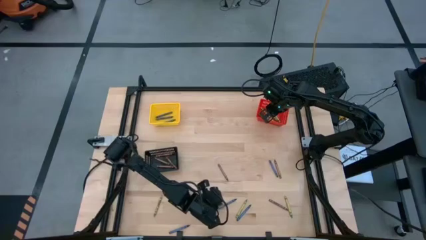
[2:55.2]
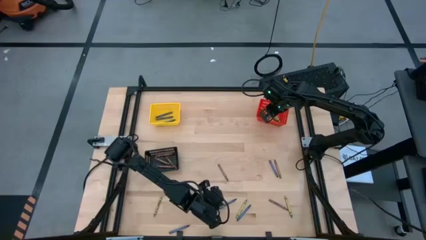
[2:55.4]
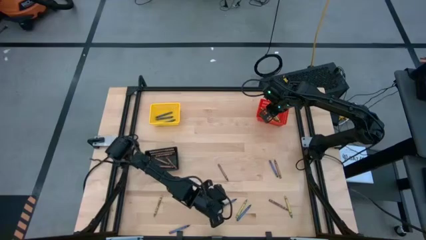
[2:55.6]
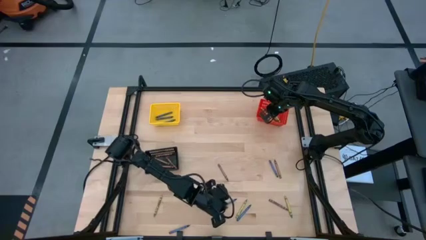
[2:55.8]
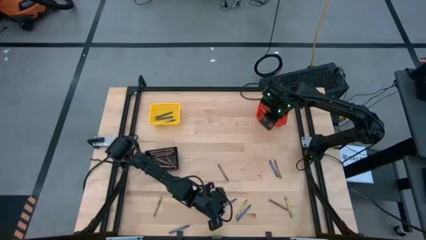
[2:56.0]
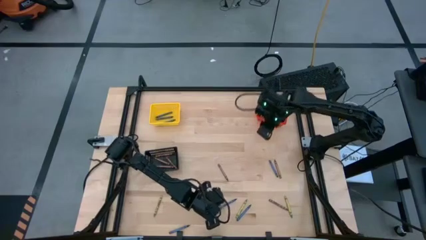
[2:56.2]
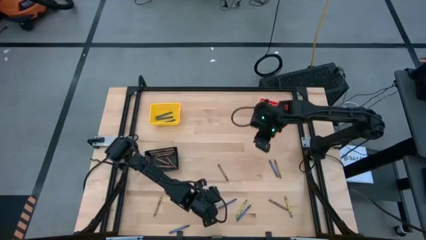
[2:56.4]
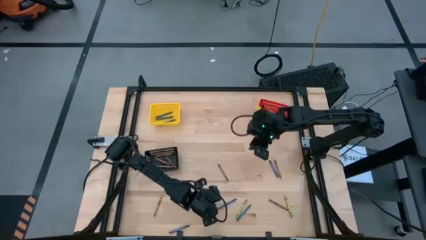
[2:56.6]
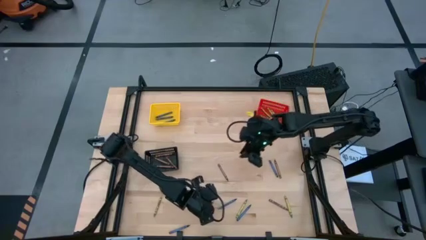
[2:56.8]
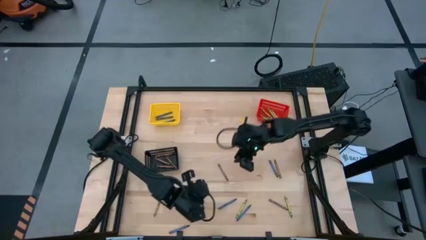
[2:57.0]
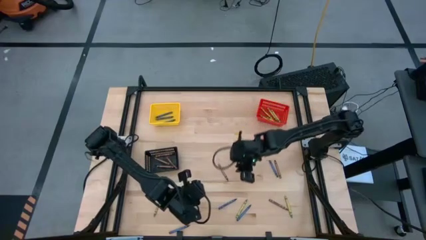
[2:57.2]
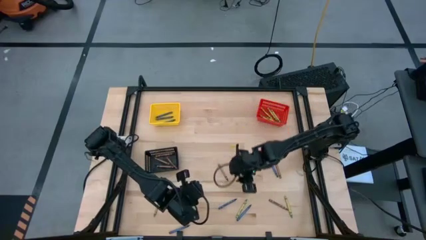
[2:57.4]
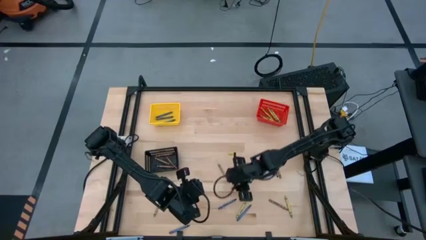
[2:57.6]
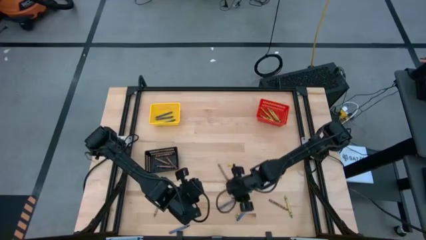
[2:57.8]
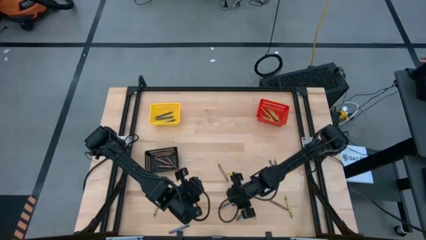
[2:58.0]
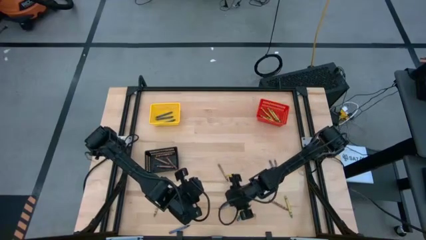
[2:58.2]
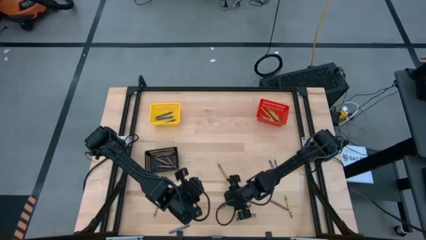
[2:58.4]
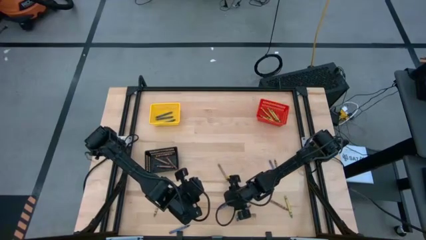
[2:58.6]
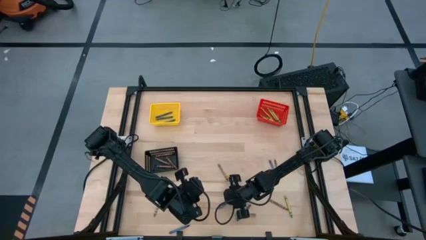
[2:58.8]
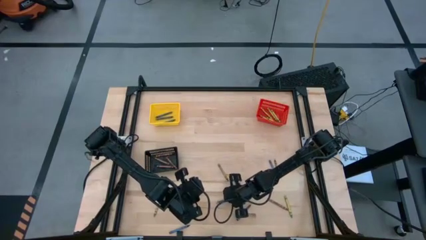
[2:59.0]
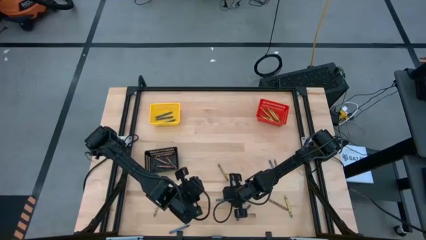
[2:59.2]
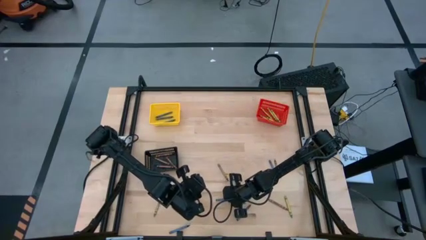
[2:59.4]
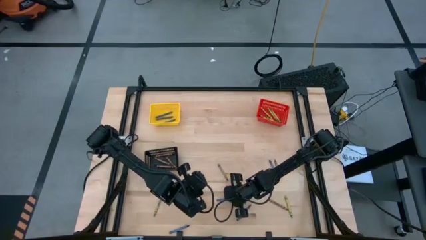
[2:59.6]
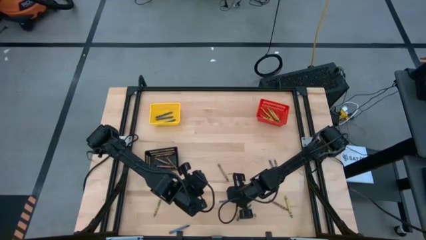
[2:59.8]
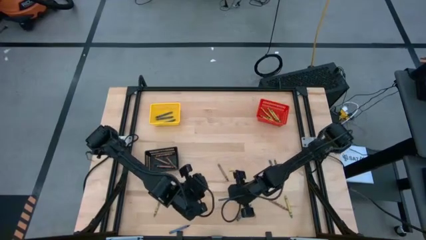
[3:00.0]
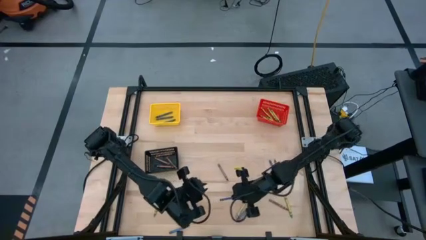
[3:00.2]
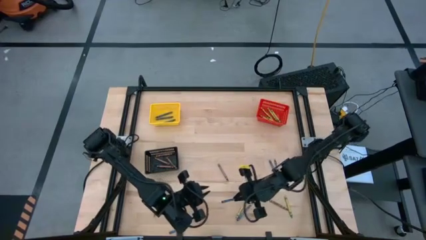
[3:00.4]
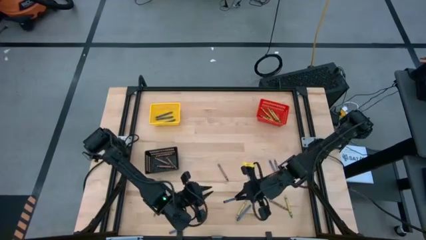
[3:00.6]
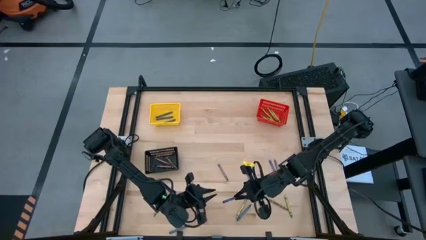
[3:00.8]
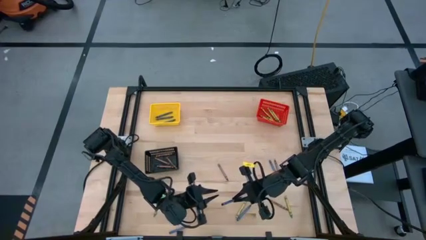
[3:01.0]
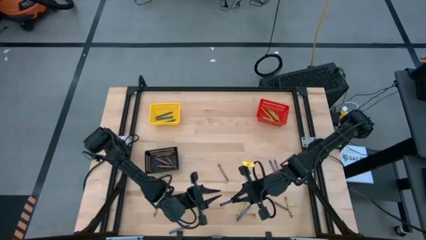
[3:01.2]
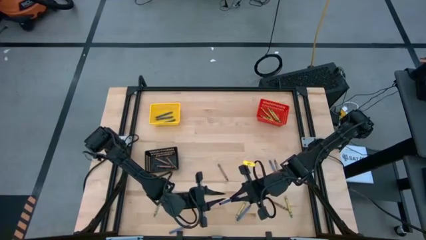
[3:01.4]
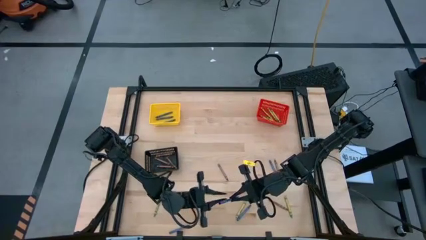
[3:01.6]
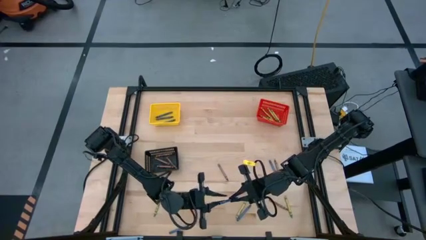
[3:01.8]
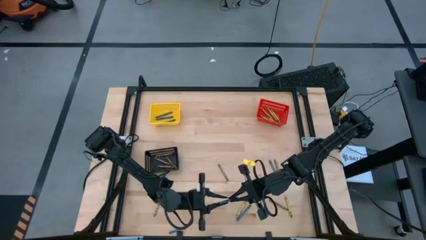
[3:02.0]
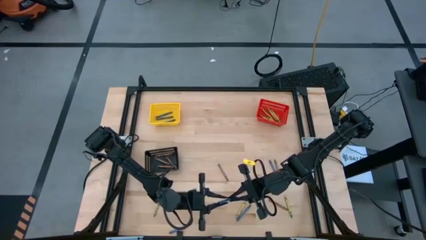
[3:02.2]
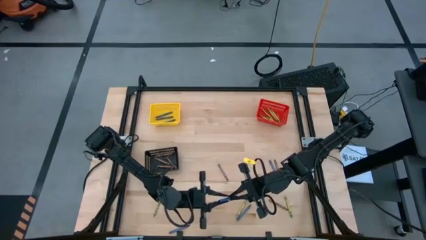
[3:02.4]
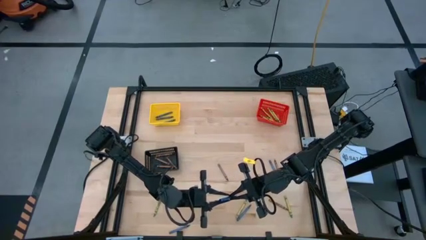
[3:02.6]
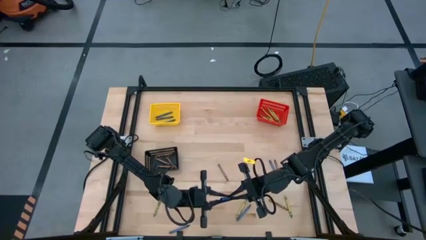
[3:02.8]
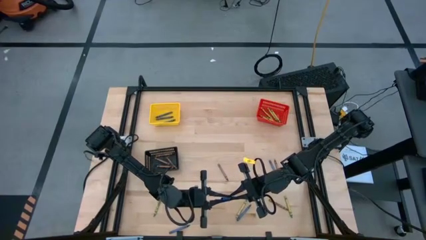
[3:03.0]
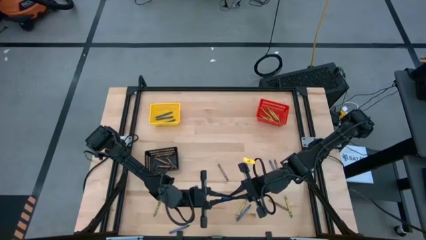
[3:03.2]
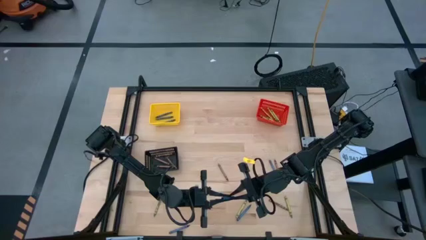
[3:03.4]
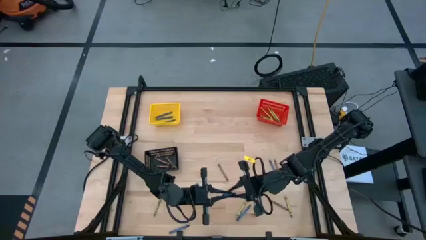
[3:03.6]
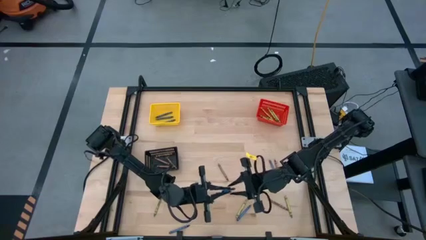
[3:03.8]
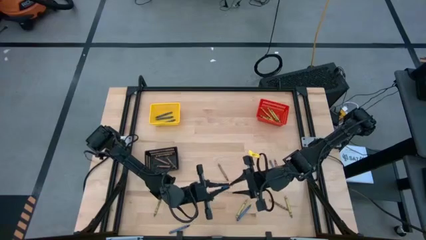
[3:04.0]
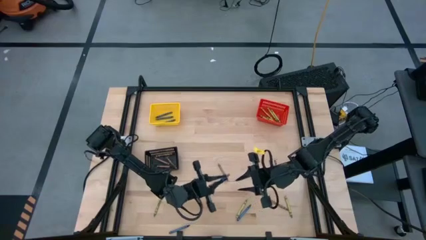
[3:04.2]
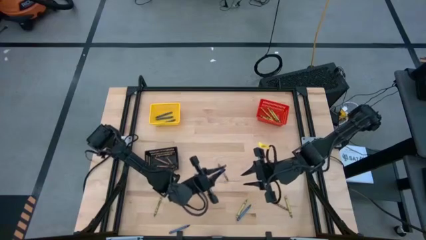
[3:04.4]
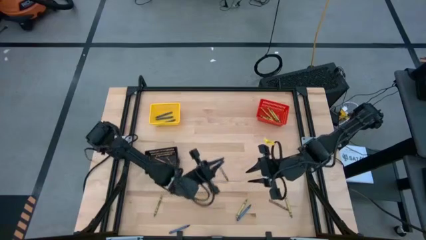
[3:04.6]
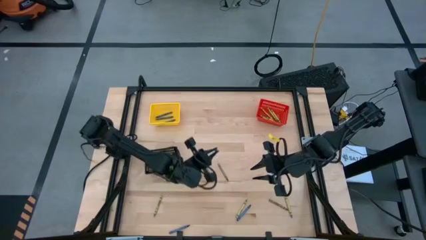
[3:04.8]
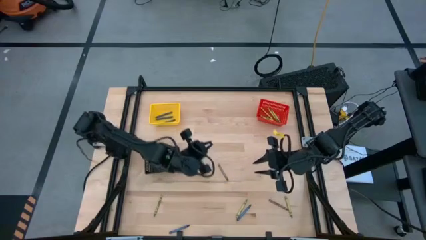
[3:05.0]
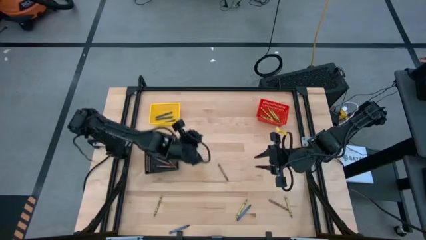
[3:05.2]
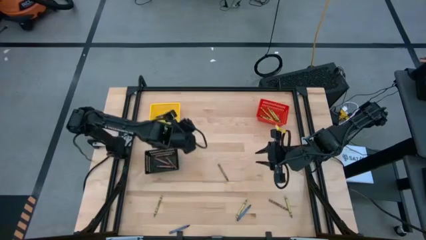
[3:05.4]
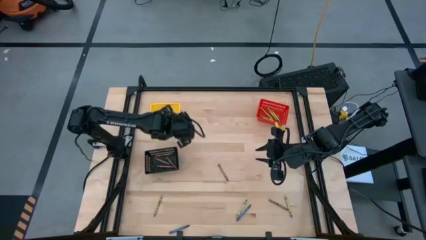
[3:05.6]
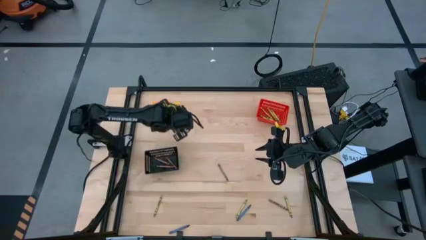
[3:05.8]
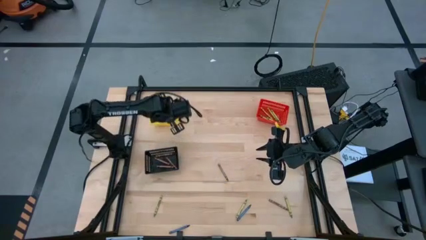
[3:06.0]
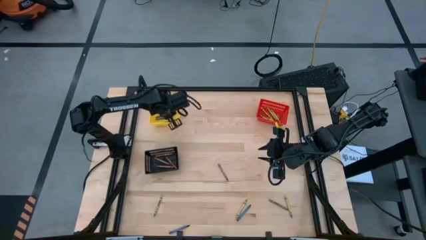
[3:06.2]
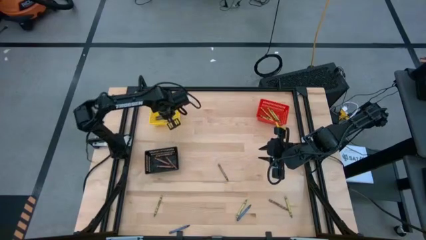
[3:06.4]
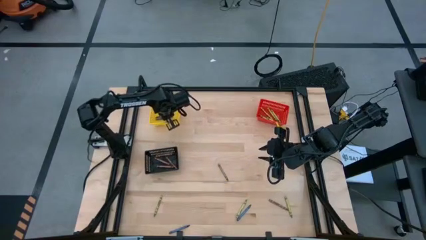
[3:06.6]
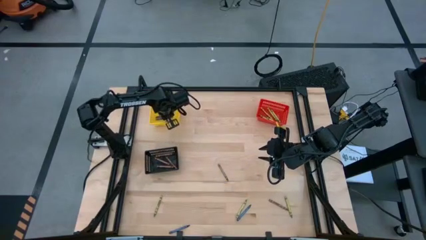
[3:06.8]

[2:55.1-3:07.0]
Task: Sort crayons
Put the blue crayon into the yellow bin
